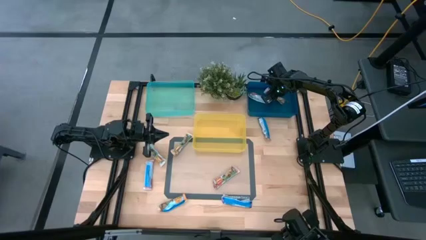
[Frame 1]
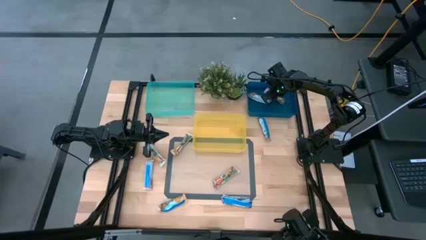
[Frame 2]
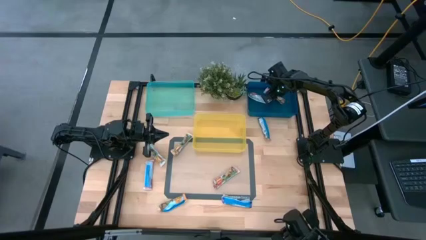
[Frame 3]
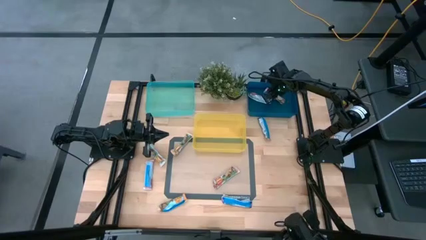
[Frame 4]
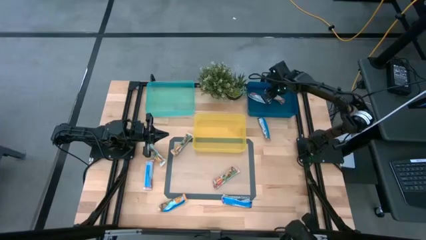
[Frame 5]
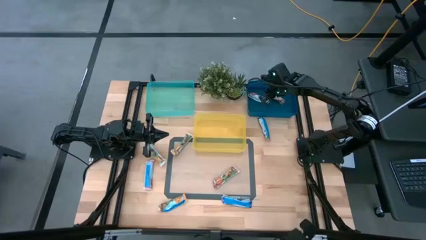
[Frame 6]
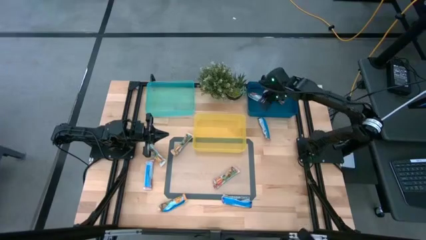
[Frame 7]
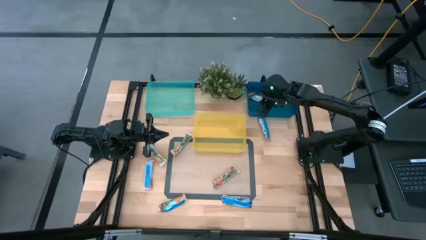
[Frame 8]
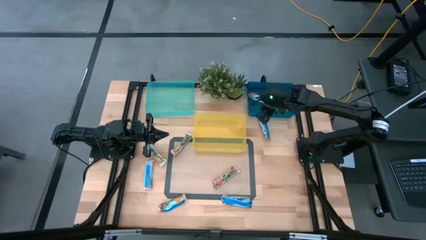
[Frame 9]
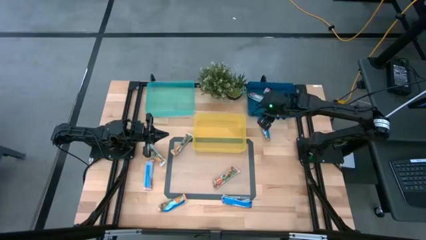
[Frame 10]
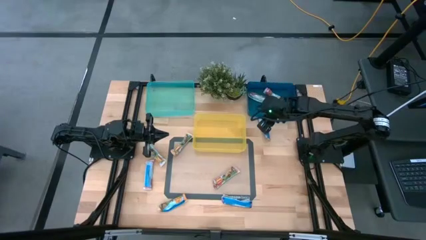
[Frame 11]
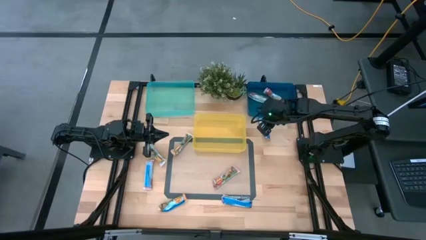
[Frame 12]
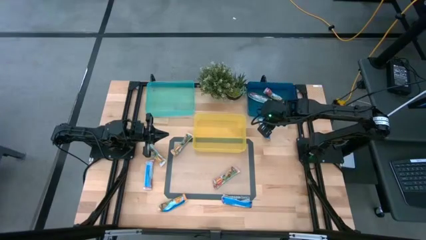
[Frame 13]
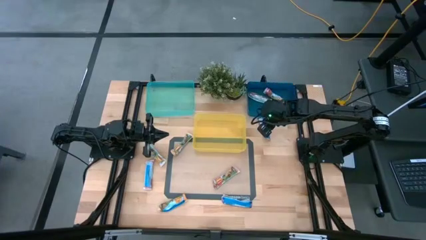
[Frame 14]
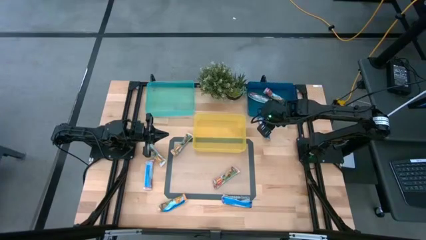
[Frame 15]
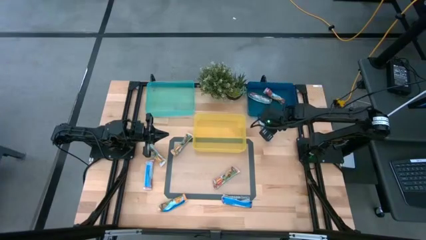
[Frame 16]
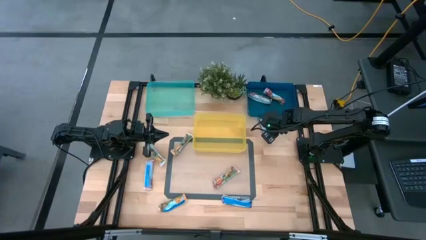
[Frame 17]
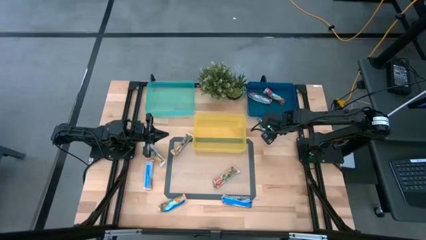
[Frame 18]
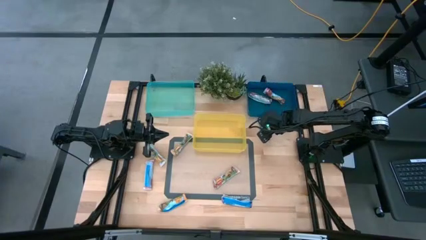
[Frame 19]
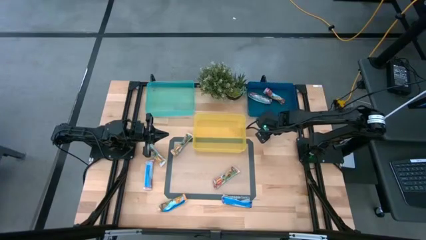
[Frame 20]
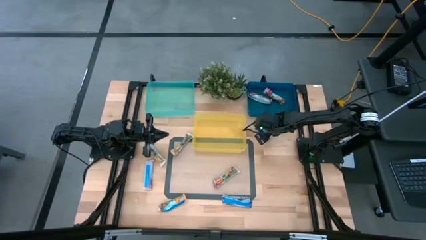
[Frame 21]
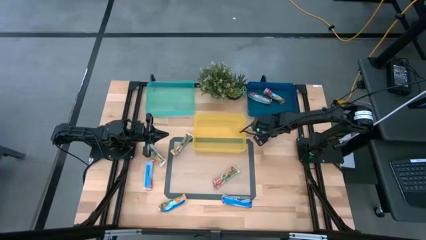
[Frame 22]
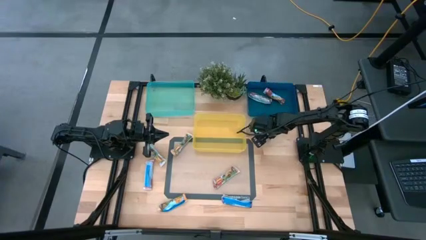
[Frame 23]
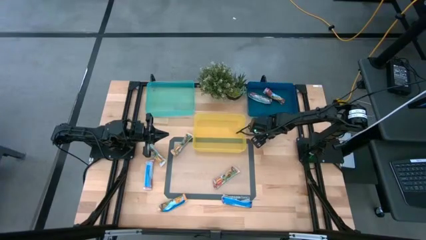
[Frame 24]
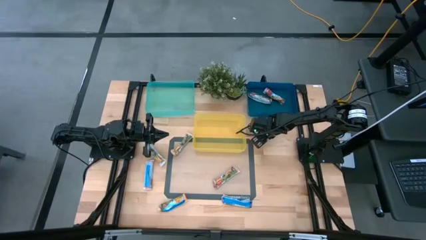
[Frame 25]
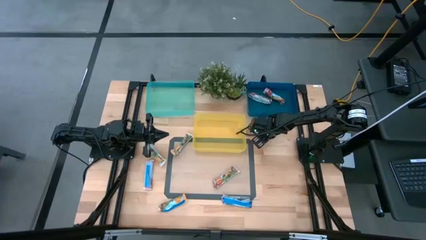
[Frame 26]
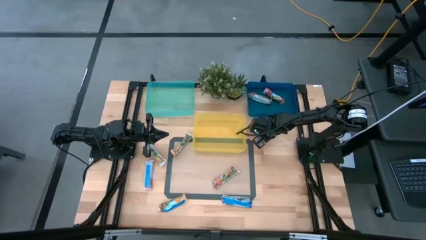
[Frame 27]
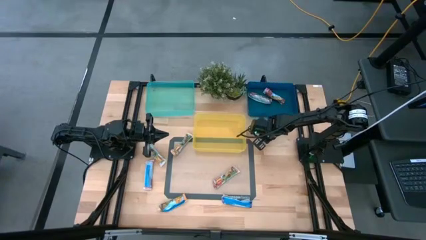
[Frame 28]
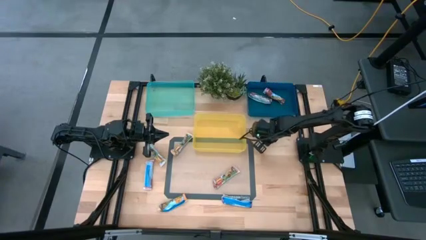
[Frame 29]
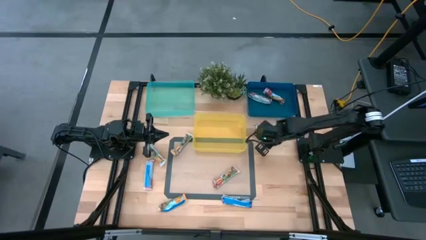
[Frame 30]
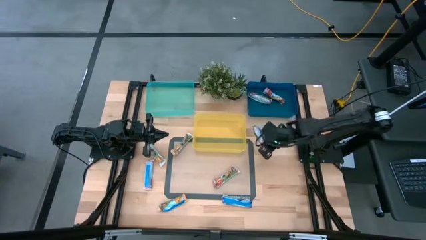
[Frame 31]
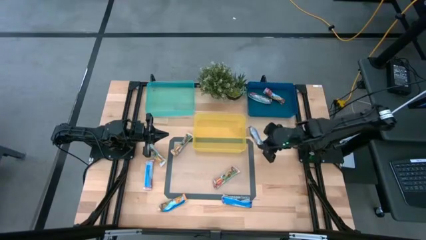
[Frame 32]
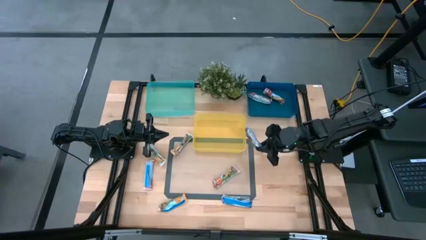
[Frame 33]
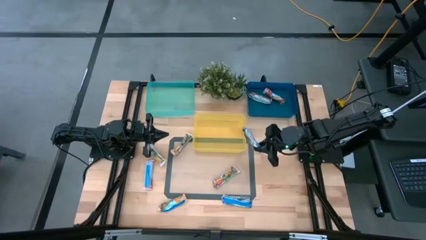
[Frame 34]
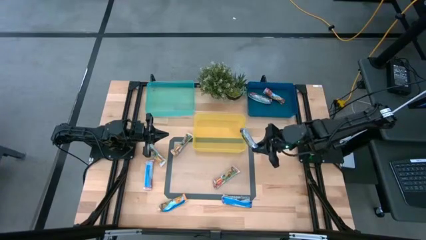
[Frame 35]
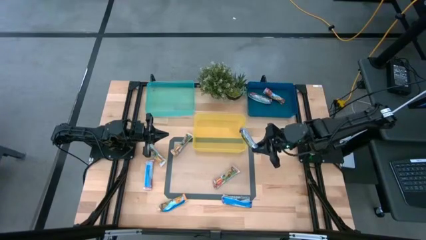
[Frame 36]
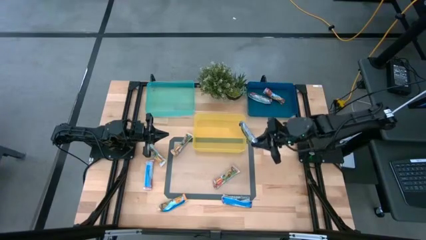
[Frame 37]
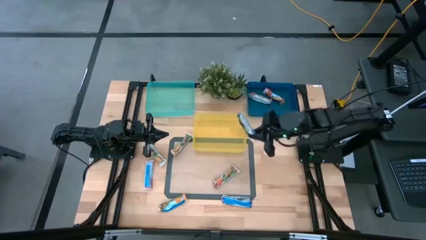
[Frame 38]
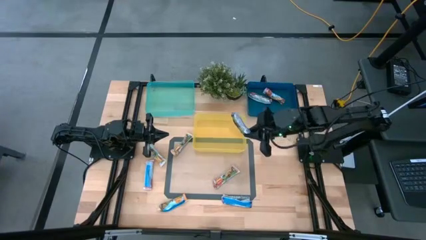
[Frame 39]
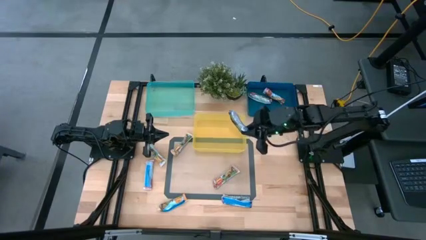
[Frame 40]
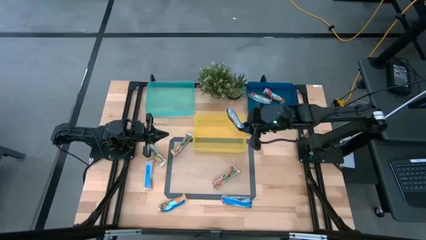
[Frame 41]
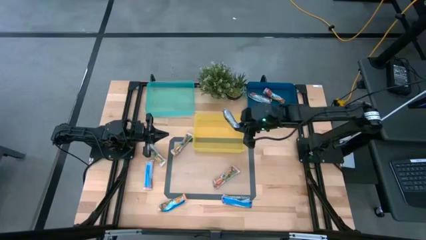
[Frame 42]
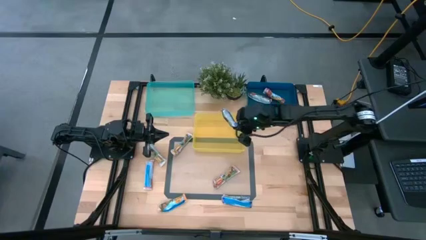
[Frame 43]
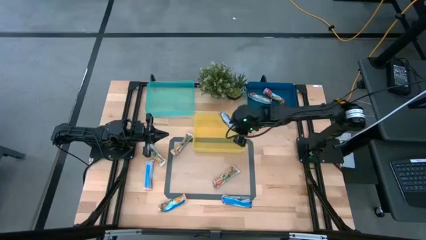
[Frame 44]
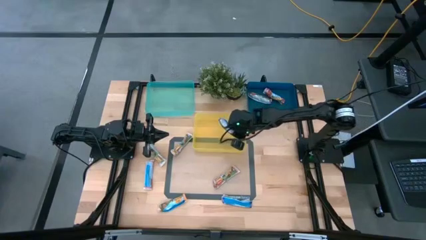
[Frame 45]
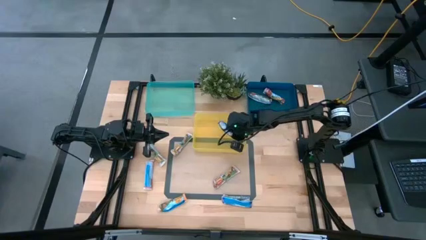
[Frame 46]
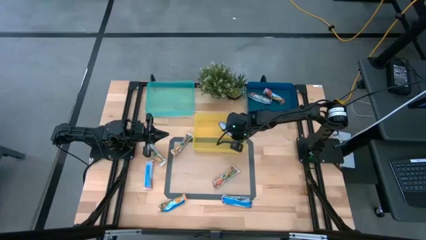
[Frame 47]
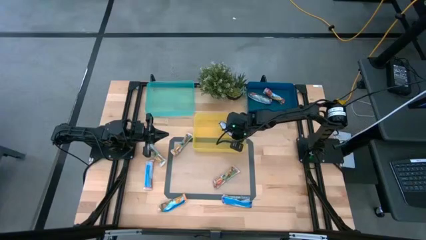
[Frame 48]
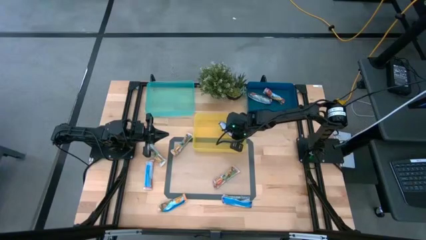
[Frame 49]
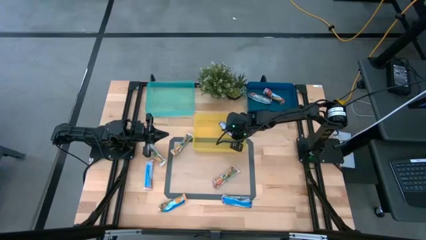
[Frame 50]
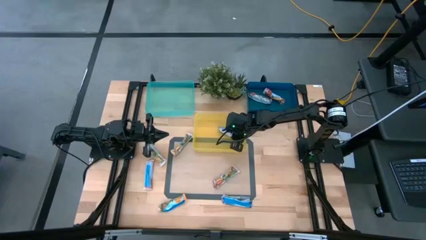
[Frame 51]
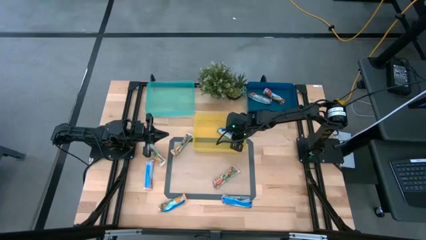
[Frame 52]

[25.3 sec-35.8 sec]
Task: Pick and place Granola Bars by type
Put the blue granola bar into the blue bin

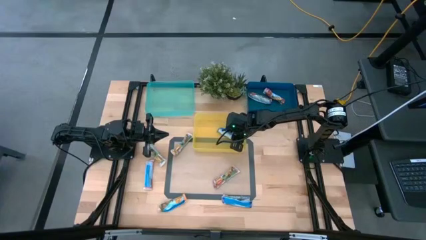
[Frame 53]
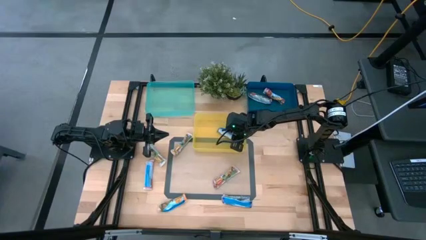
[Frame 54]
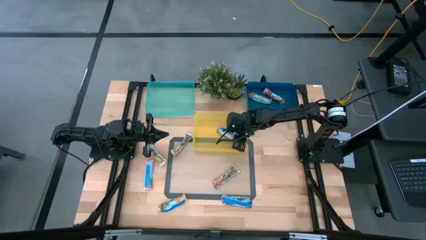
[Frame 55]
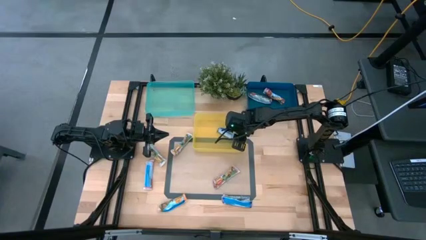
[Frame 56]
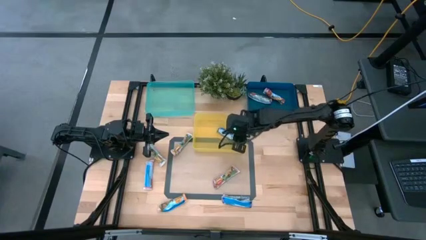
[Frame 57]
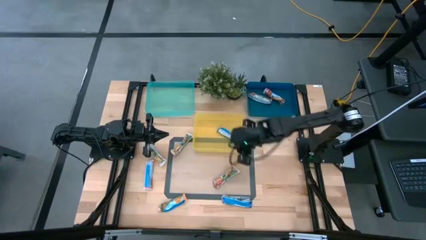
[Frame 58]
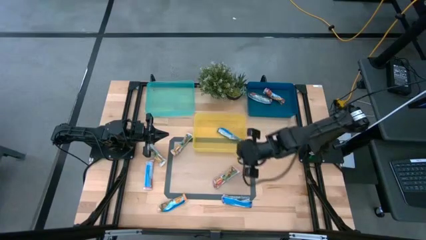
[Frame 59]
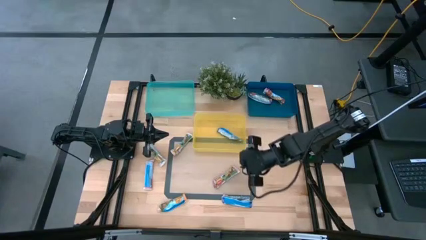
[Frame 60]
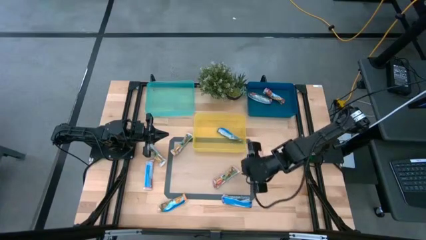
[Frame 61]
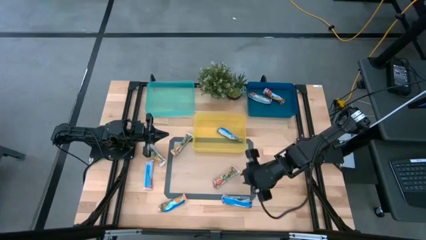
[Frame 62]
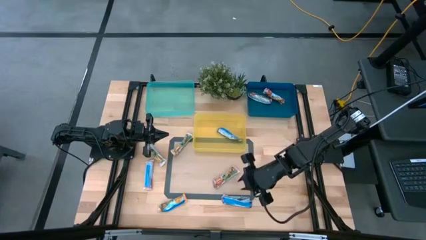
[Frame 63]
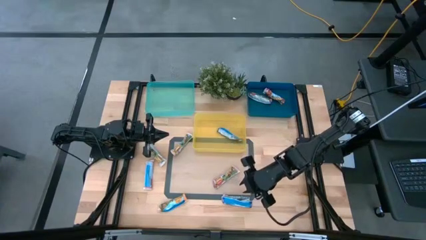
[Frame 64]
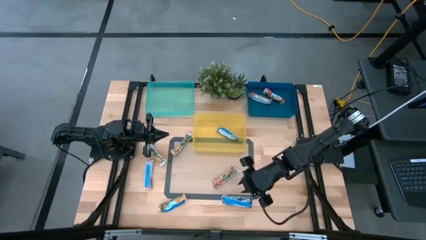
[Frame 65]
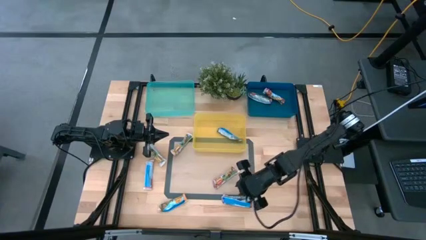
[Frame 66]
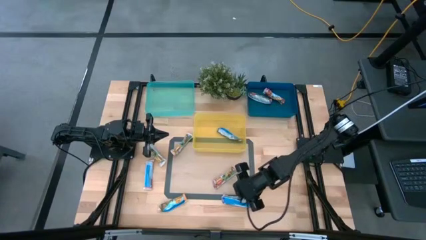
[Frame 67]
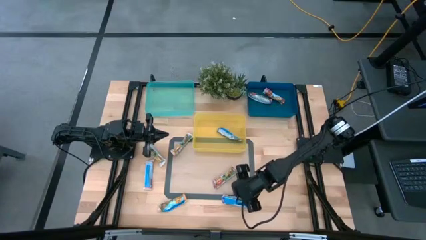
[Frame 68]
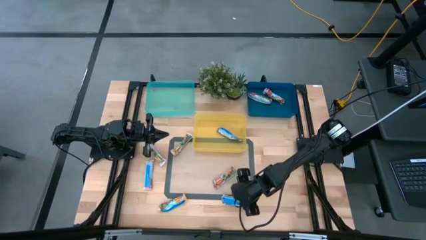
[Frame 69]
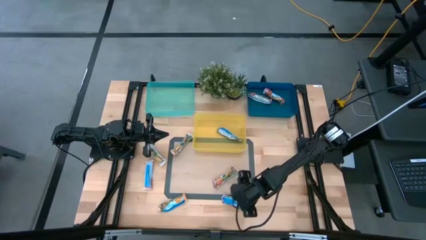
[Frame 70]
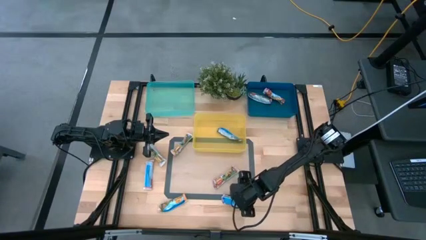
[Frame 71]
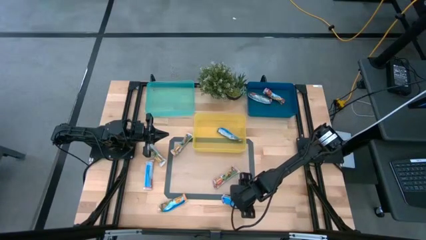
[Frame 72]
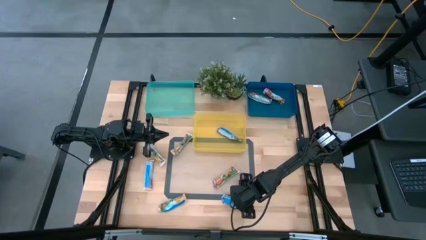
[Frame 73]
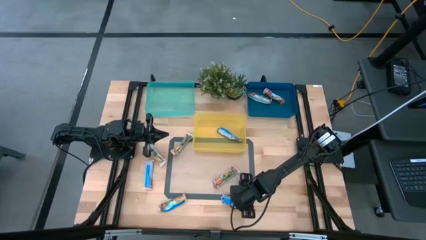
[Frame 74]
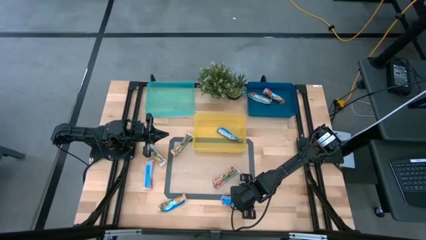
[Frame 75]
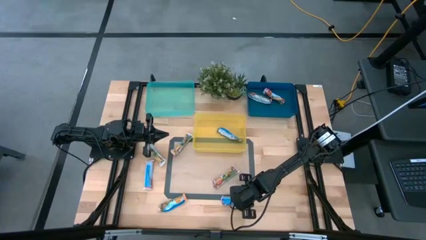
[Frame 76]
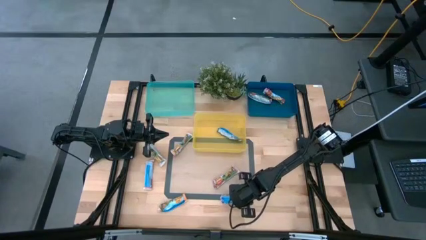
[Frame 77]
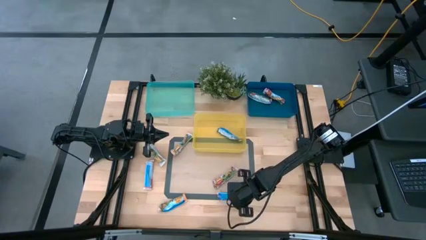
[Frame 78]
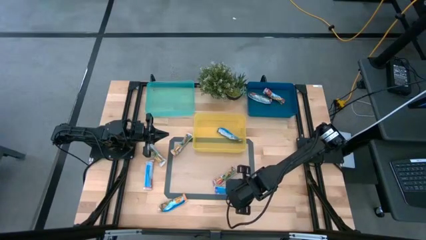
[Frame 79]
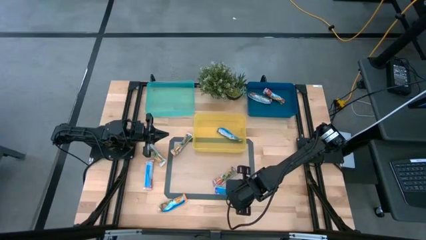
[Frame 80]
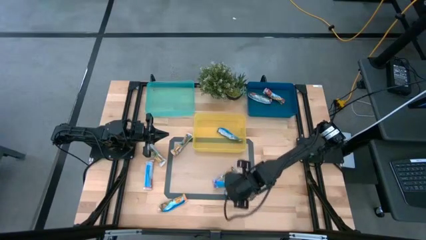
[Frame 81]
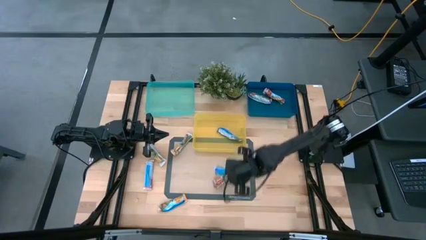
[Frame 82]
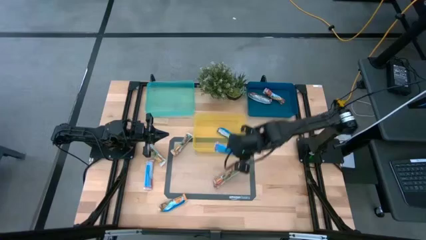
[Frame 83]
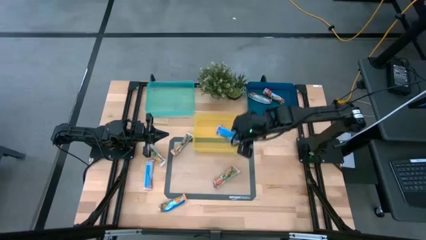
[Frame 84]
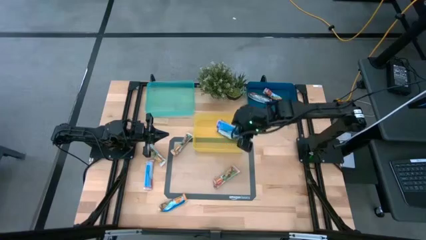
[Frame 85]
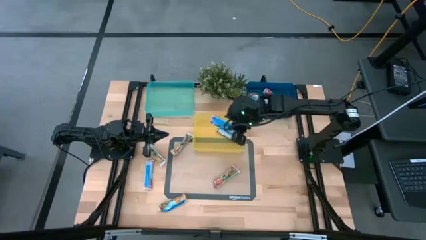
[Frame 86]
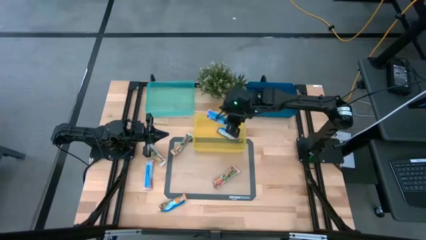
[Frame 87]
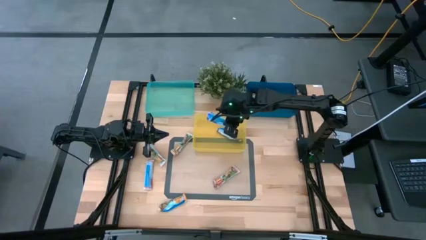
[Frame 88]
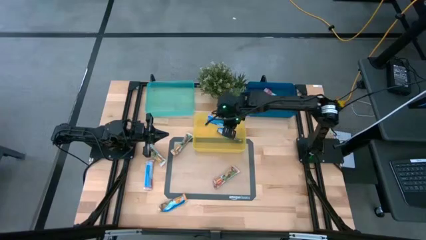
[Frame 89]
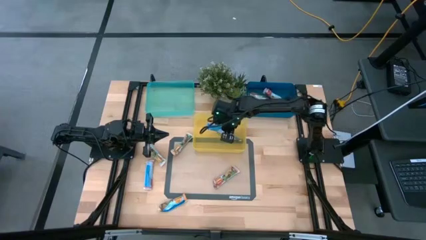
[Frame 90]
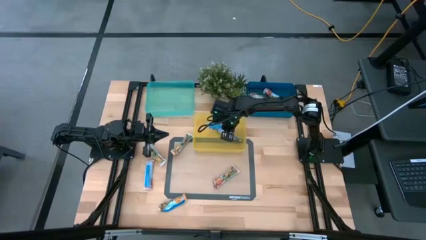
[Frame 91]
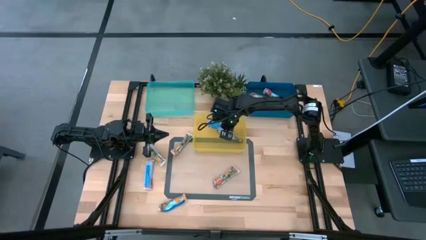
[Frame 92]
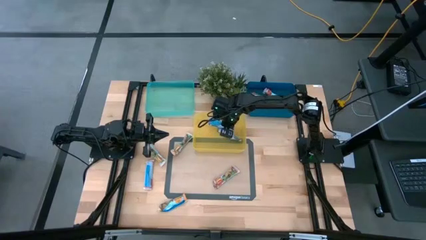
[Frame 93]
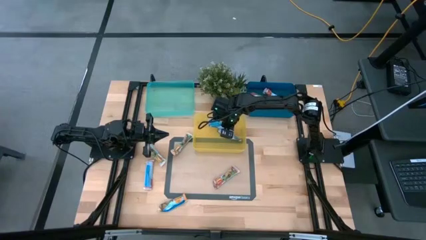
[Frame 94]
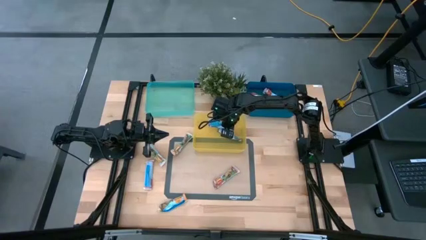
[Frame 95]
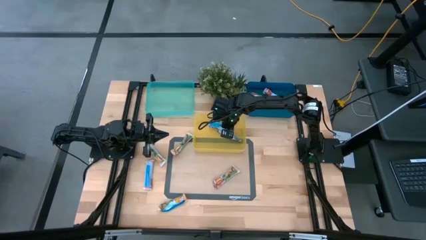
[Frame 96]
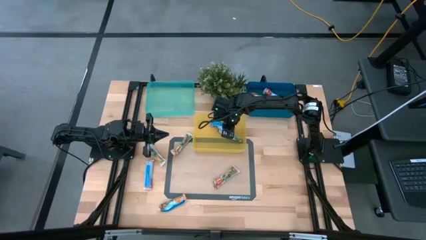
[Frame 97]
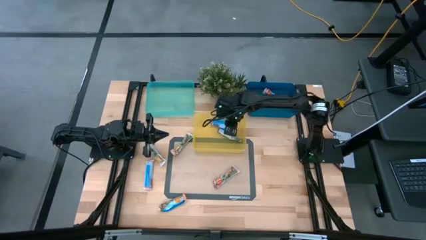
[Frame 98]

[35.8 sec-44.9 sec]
Put the blue granola bar into the yellow bin
